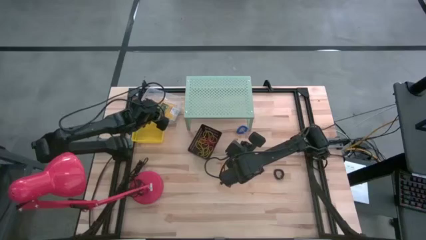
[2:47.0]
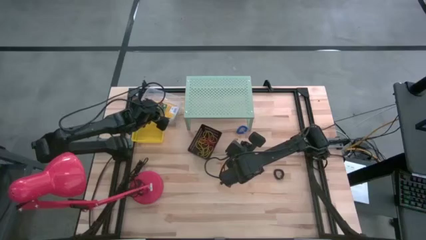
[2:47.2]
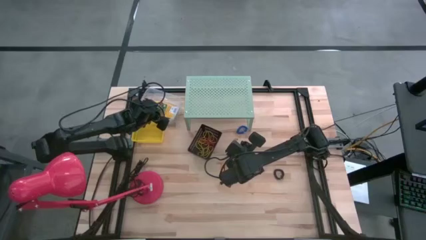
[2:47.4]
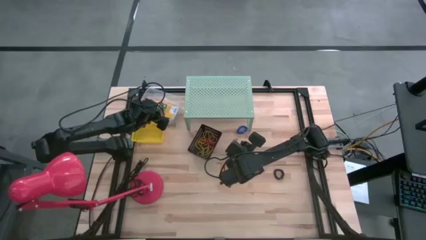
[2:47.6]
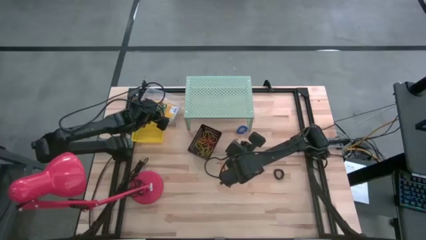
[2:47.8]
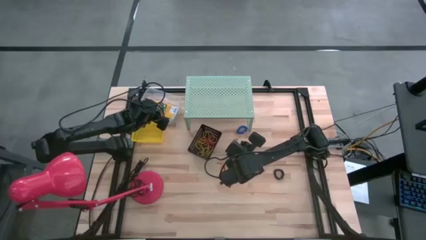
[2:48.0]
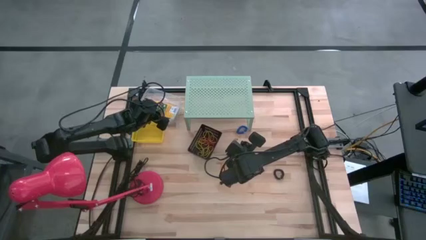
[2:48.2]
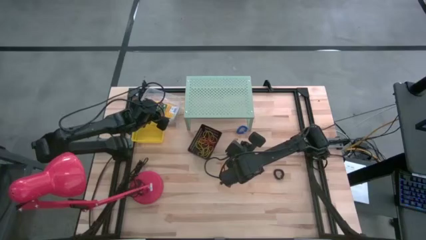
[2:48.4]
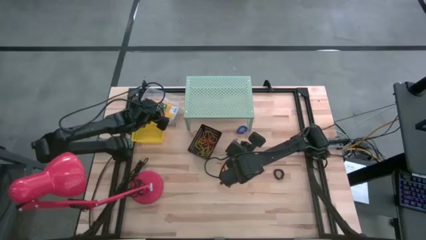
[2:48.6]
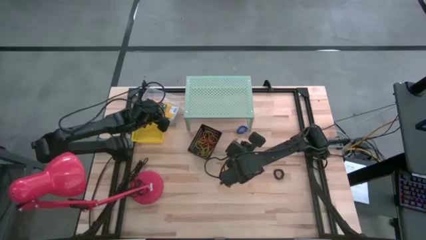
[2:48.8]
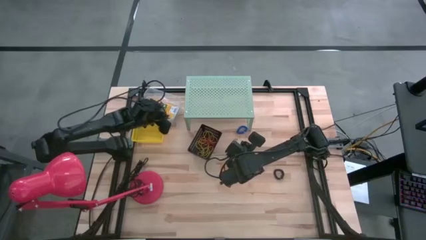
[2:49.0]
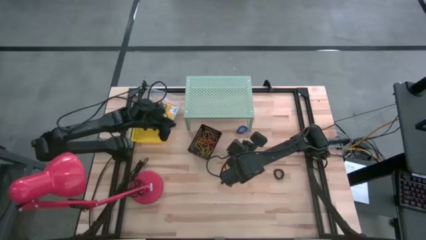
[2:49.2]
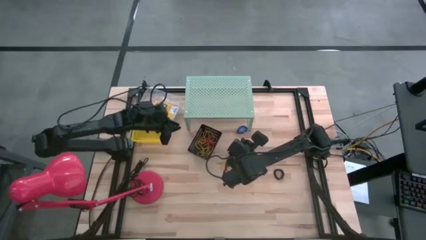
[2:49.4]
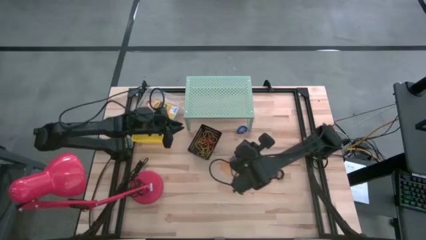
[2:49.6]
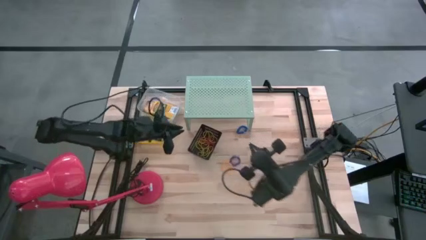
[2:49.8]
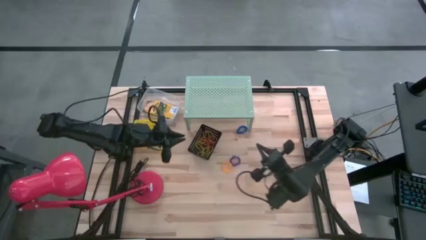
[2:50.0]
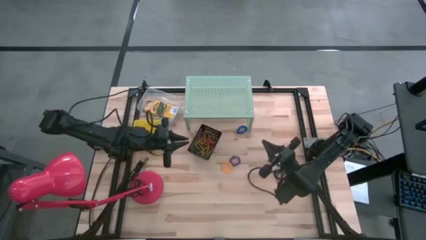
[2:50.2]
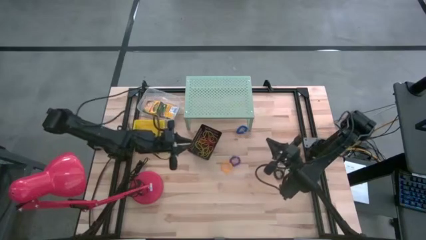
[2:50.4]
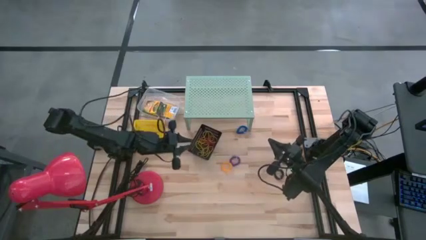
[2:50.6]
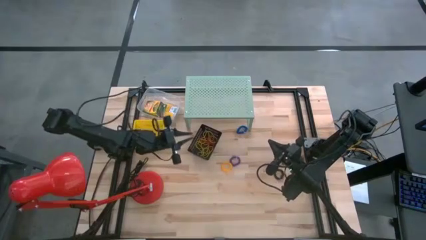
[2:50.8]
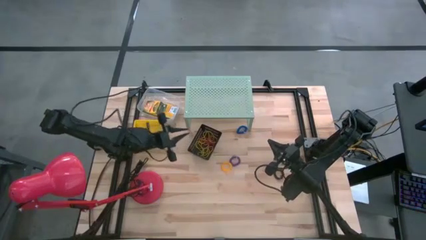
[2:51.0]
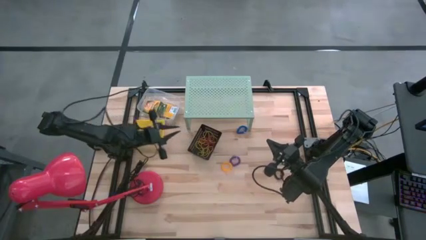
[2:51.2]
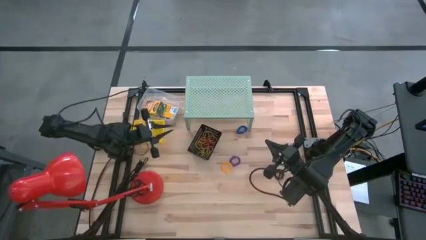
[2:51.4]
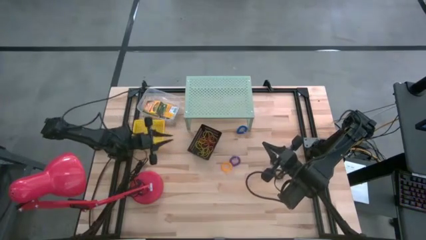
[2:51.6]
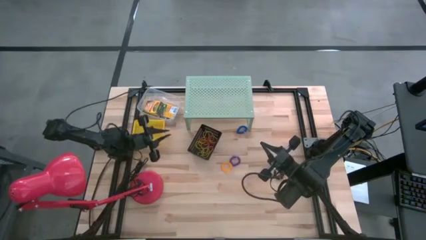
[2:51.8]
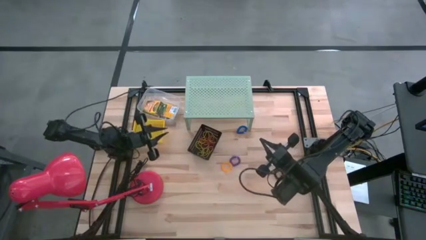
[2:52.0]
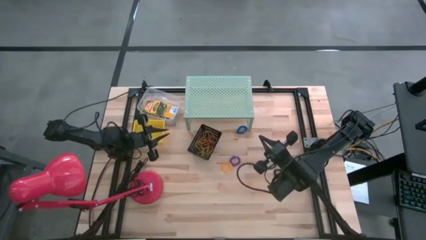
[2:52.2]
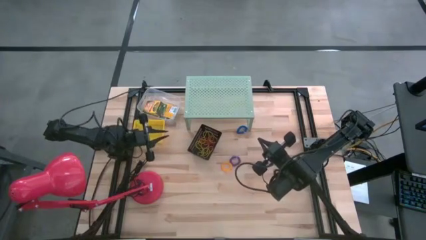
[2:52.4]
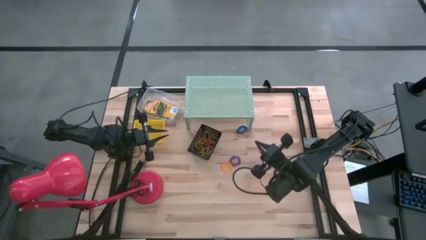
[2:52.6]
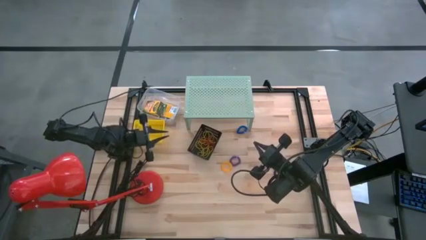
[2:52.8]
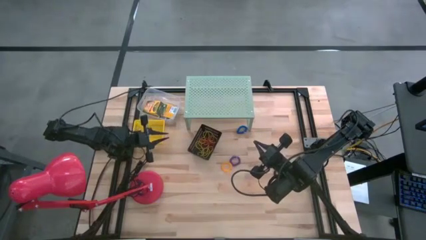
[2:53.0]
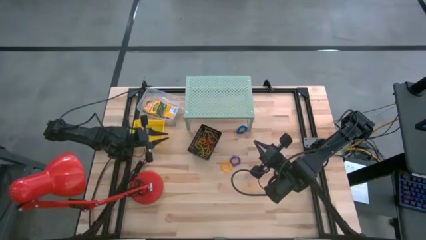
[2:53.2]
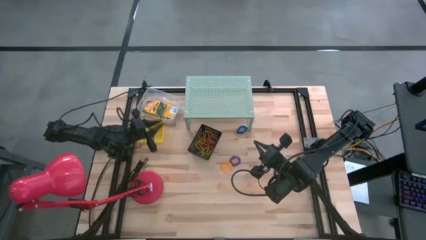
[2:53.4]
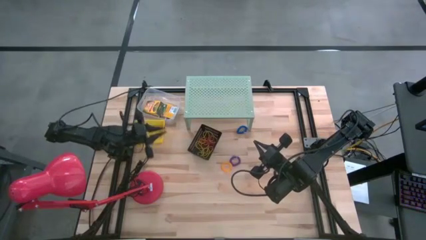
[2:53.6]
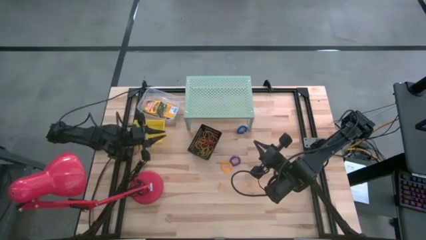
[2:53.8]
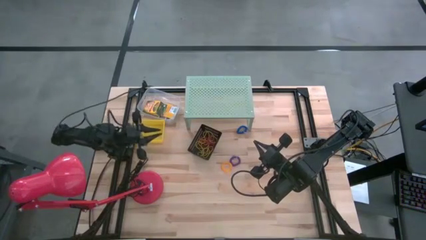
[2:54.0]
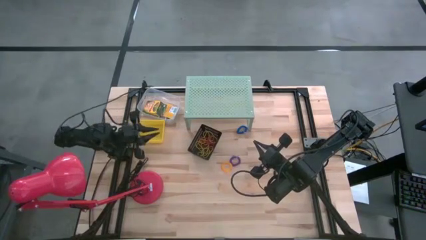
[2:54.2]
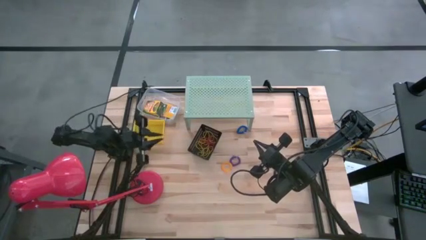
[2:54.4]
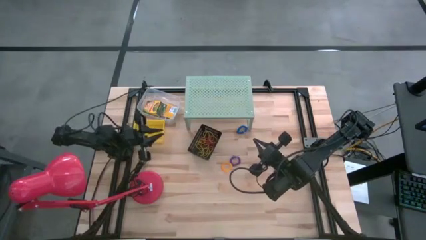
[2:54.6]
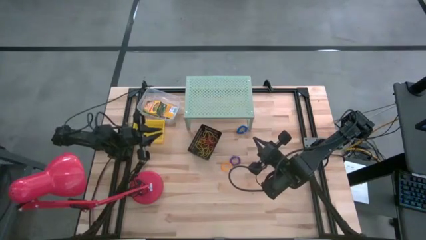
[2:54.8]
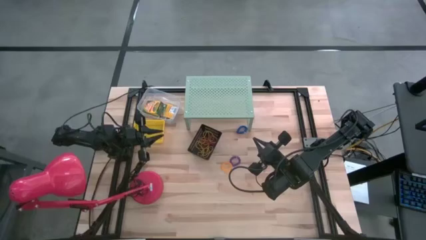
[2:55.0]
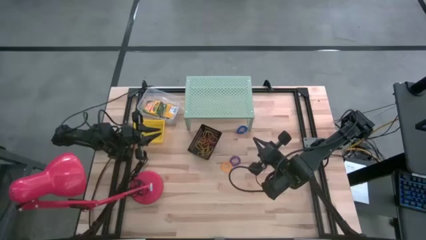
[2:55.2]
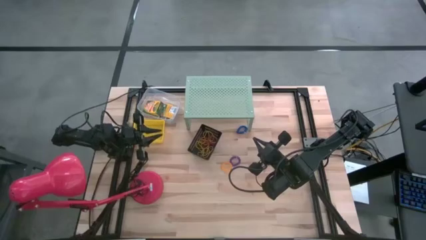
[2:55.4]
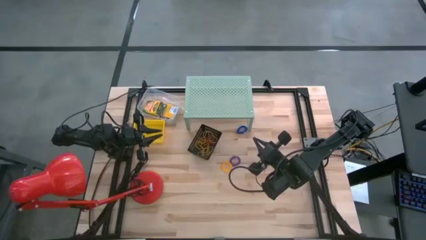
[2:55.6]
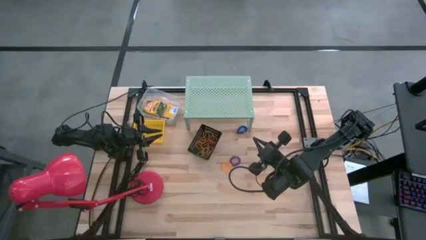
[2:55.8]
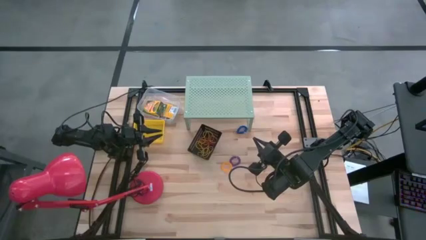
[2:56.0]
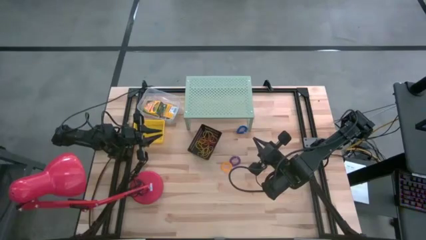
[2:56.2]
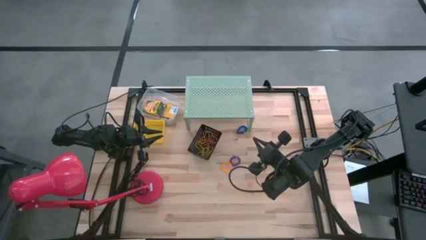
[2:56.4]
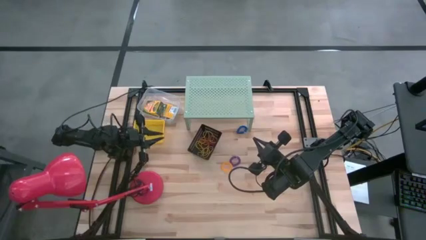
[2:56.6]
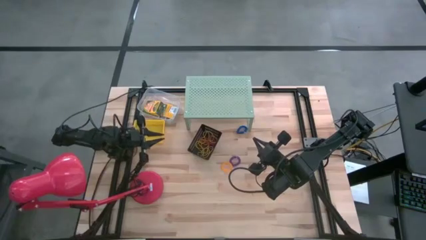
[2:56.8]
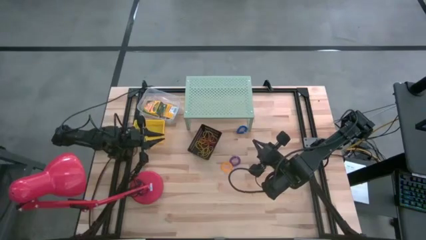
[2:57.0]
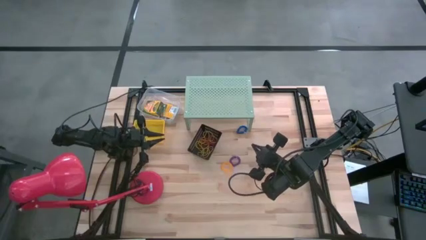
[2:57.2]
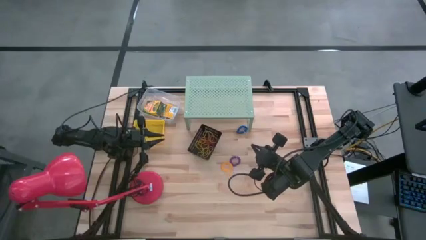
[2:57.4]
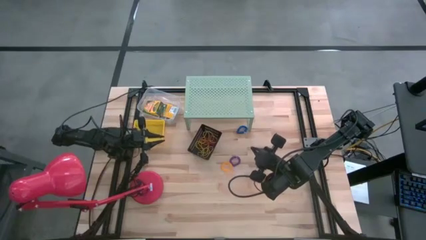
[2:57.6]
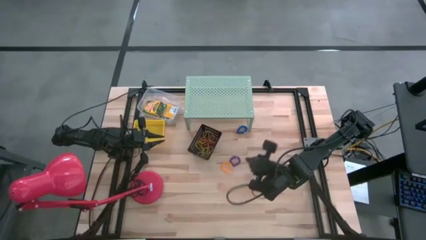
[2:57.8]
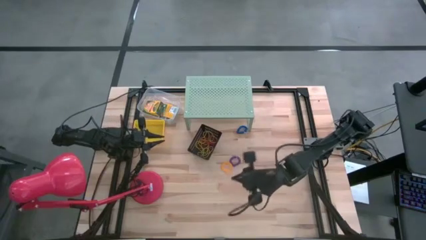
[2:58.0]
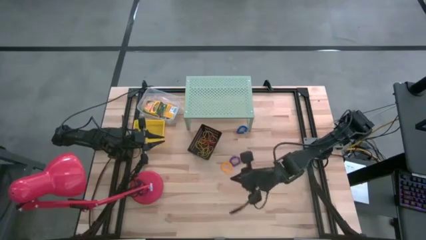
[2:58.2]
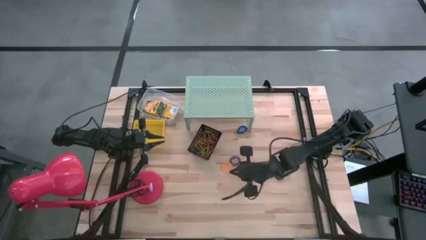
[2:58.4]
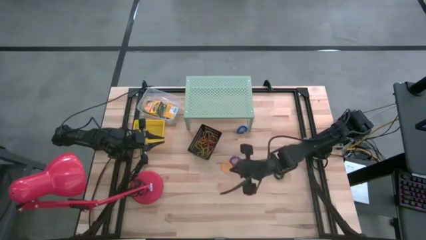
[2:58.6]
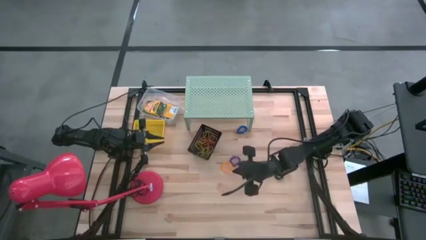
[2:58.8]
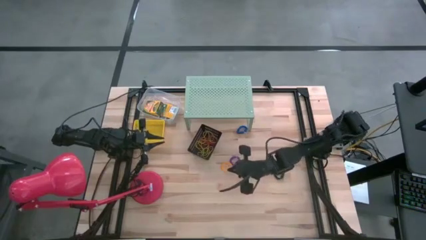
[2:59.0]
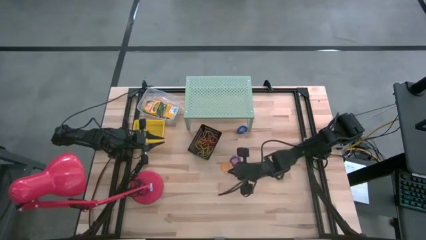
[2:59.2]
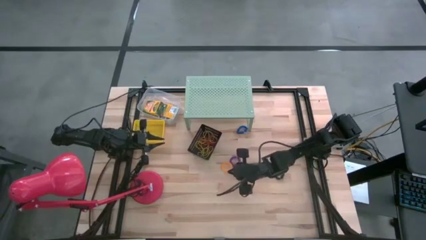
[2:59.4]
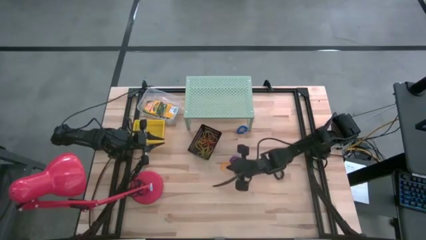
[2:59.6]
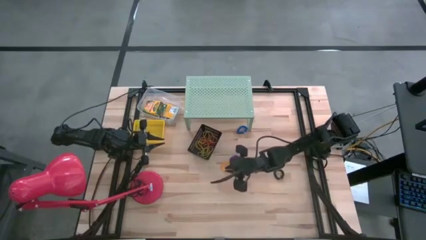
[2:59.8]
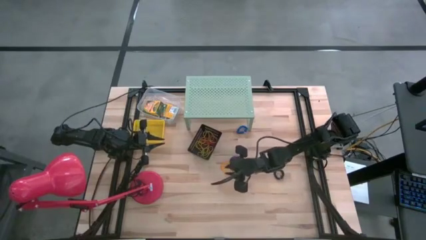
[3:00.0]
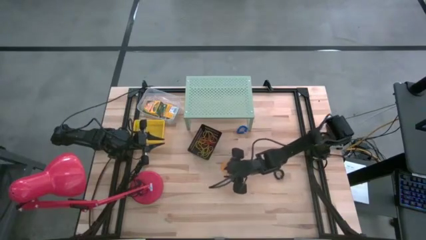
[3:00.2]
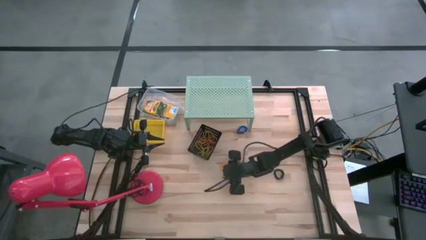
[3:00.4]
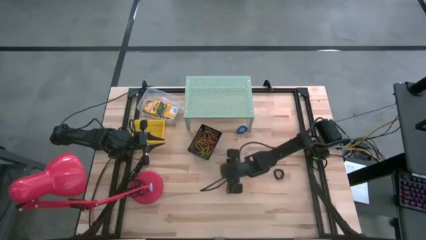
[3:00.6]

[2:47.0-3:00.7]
Task: Pick & Place Office Desk Supplies
Put the yellow spring rubber band into the yellow bin
